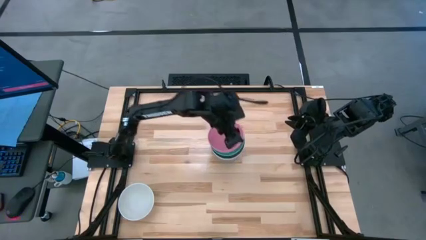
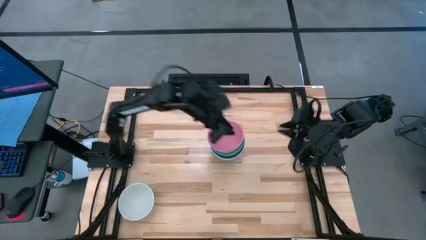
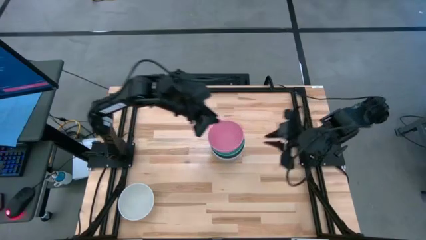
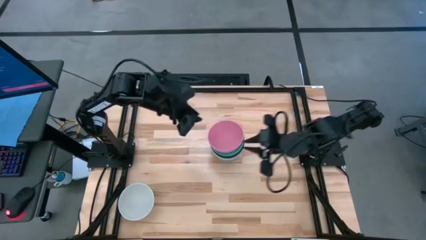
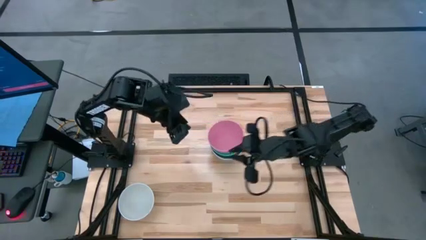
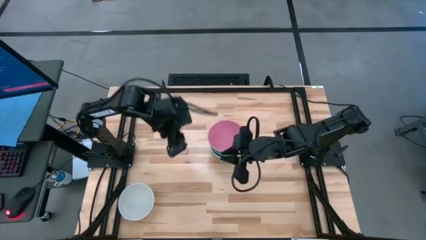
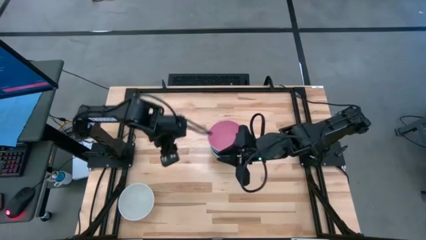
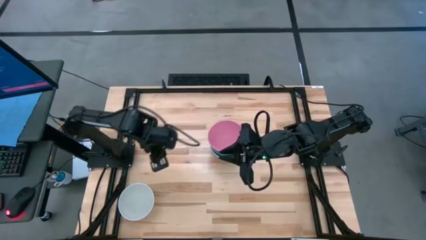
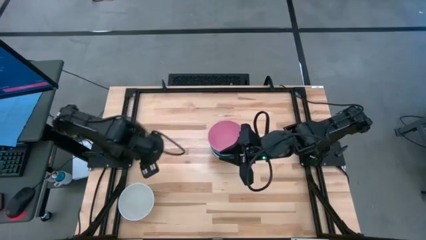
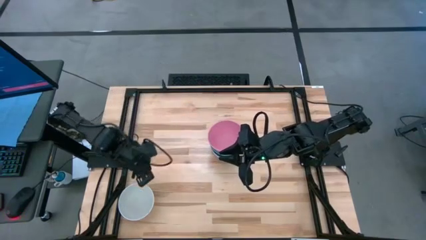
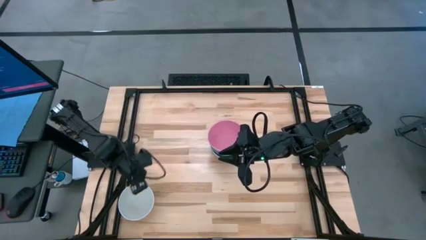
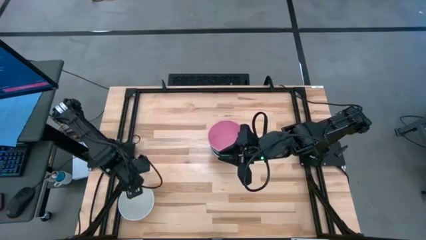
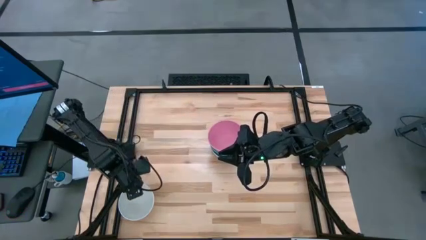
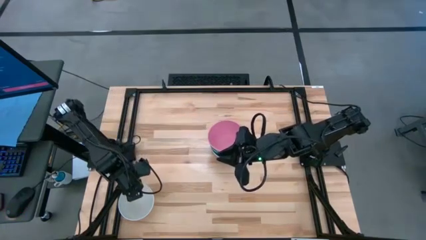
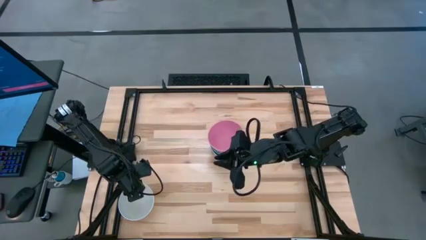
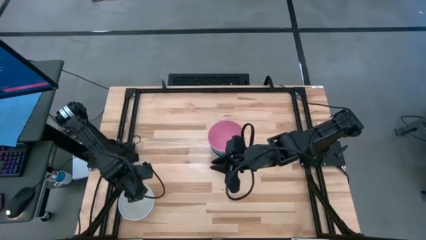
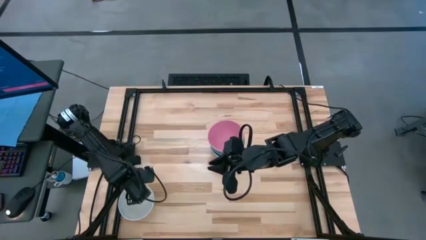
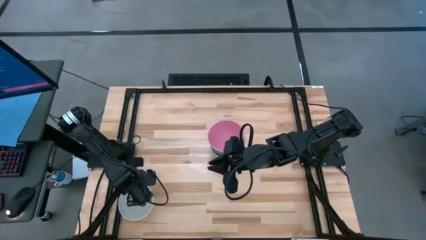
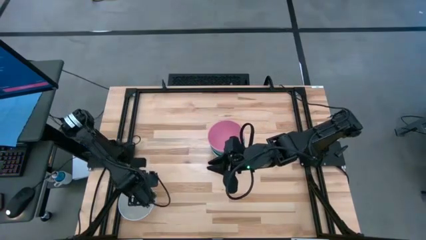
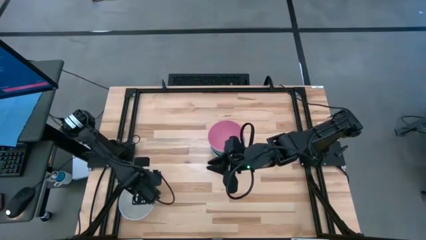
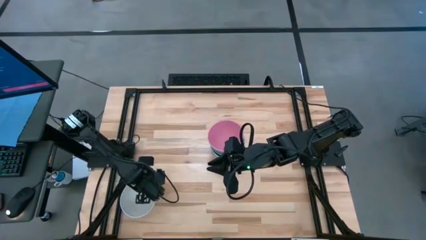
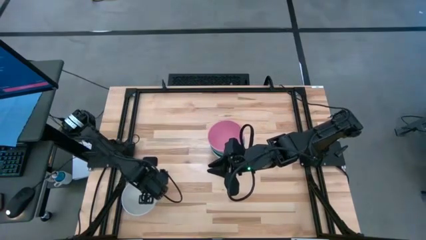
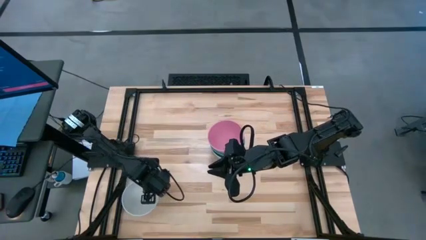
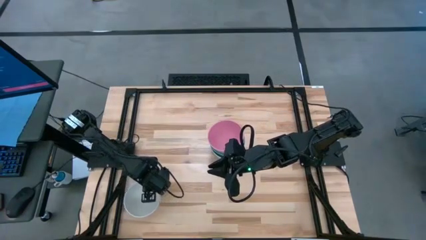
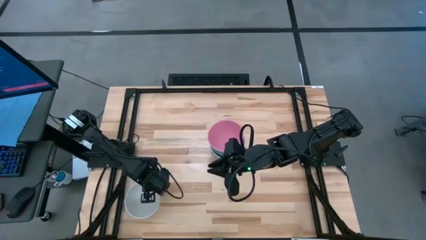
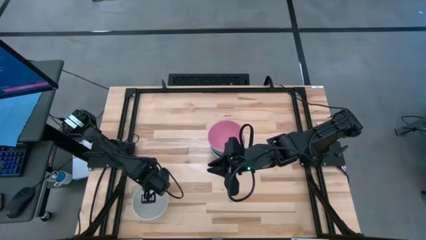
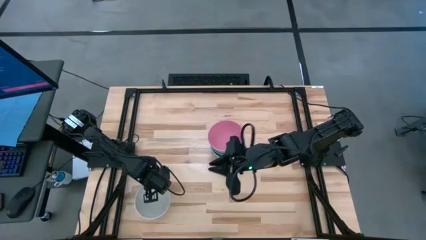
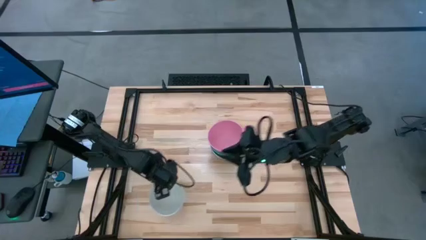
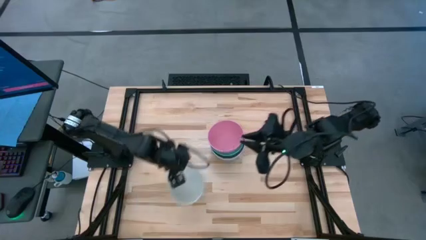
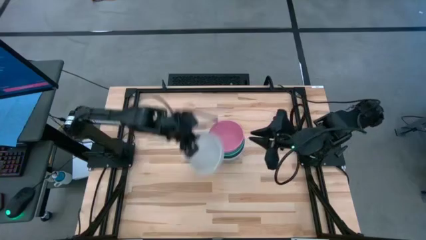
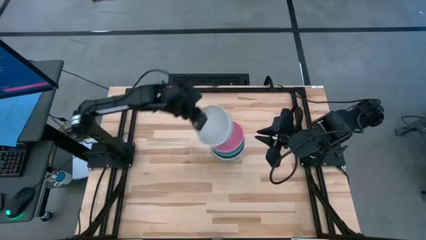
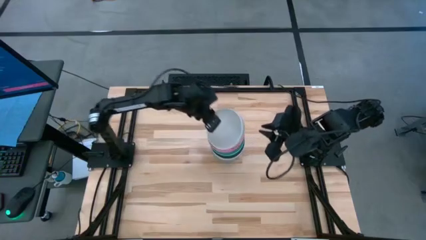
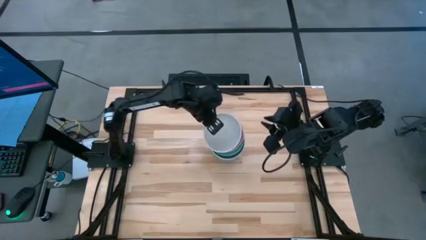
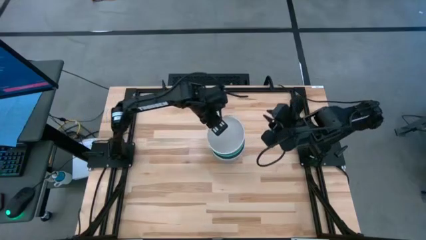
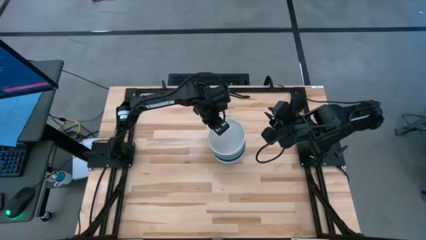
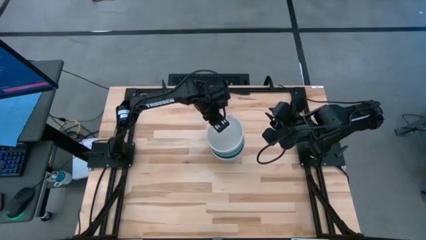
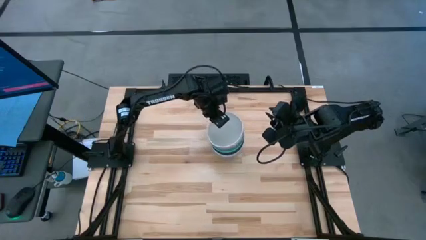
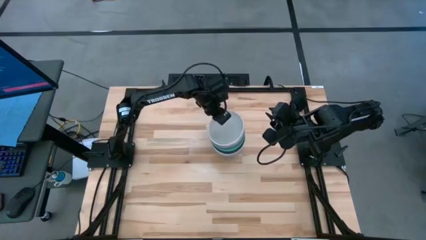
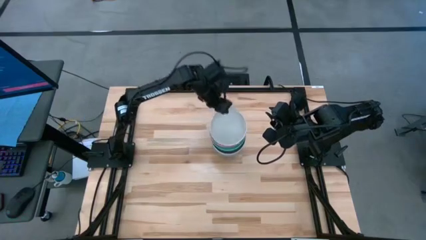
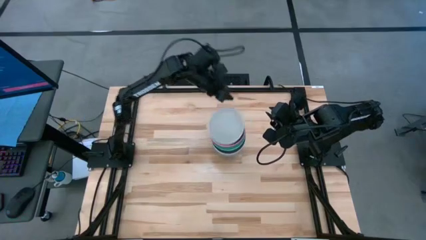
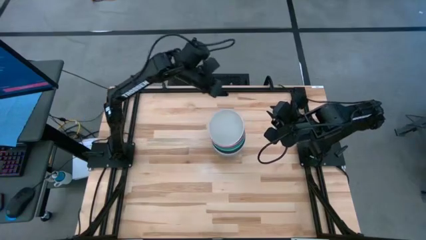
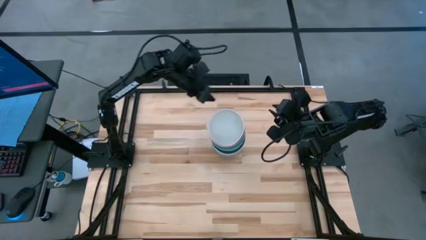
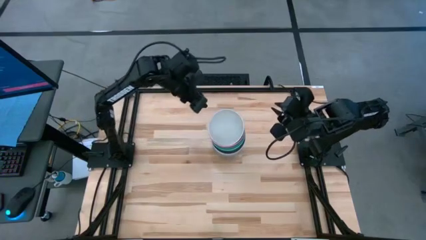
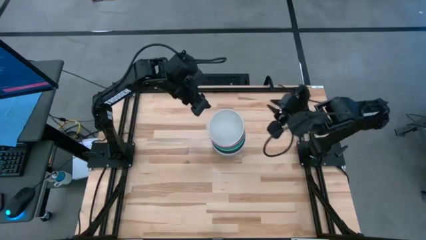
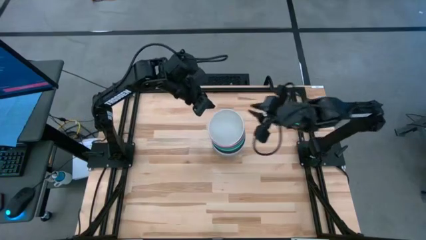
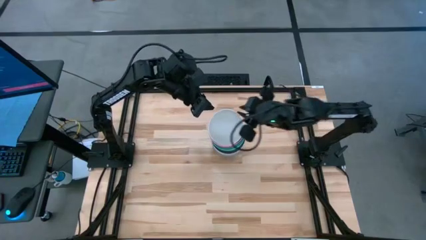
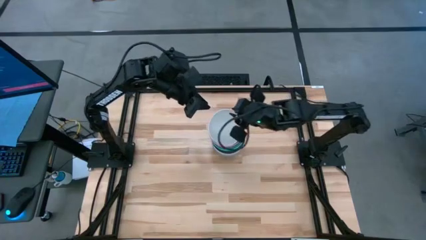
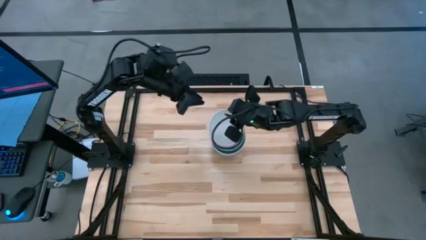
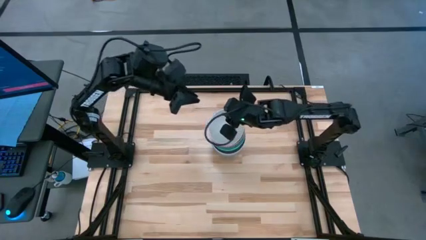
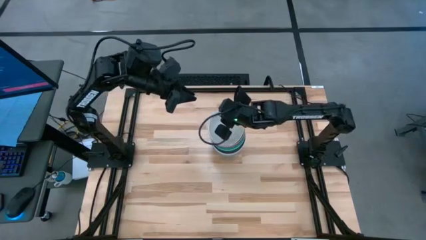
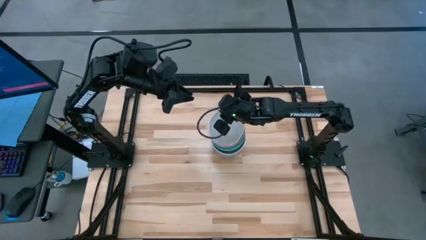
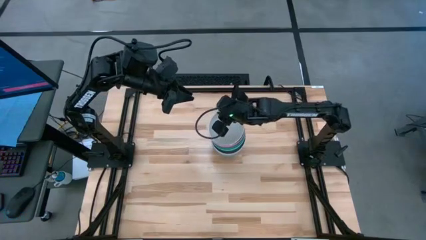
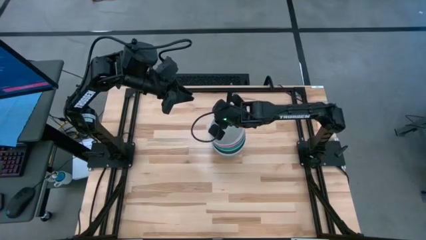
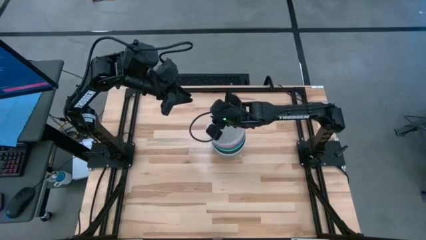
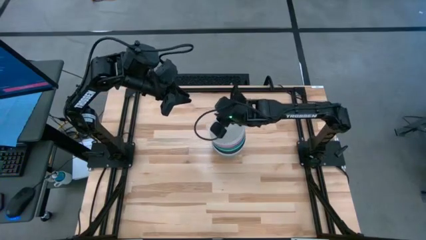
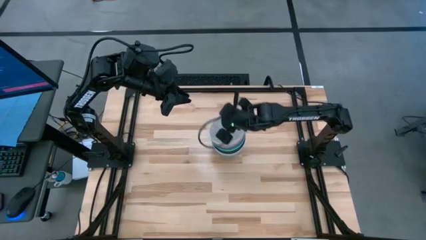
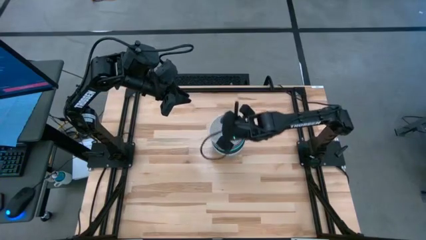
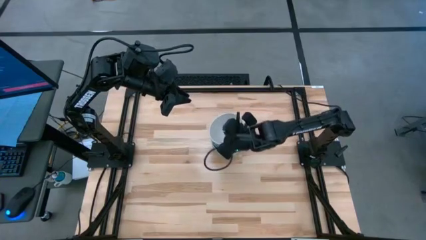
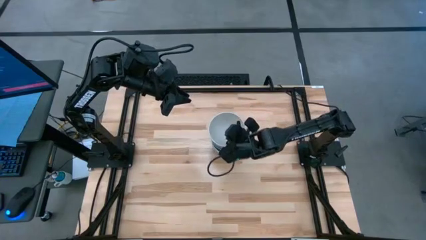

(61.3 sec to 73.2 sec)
Task: Nest bowls inside each other
Stack the white bowl on top of the pink bowl

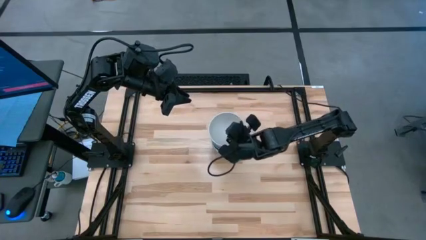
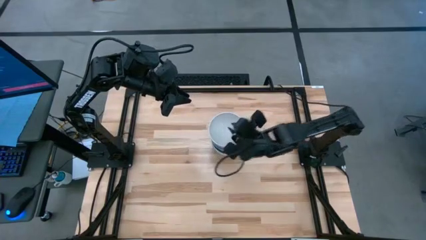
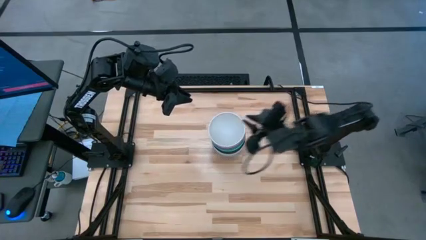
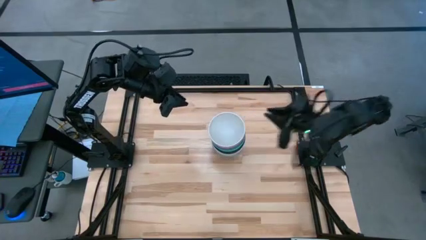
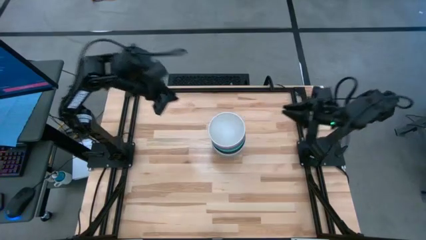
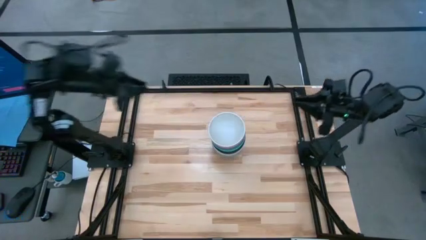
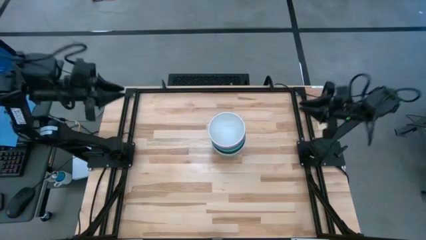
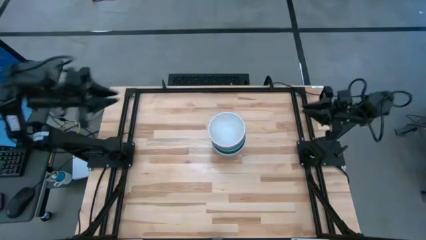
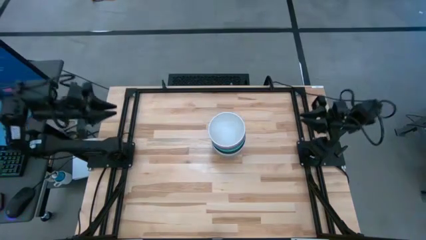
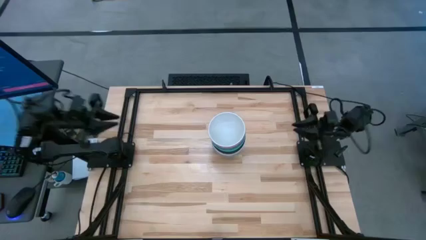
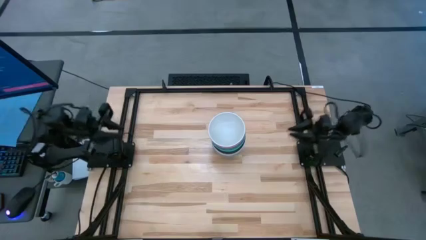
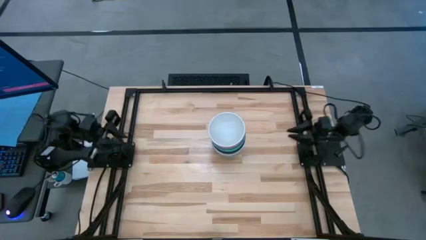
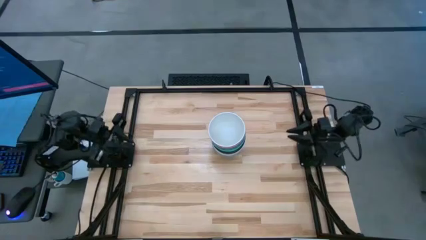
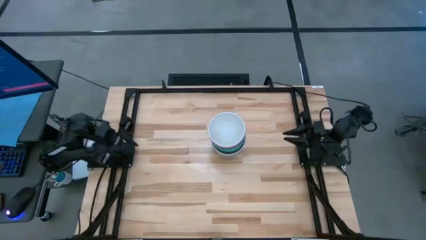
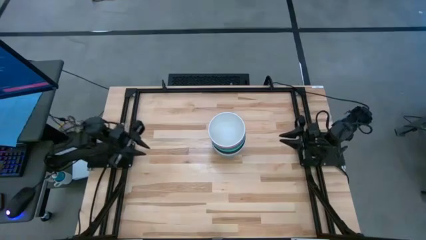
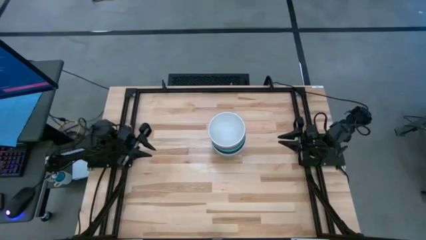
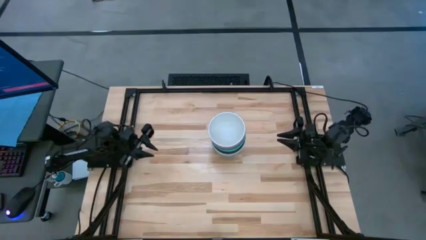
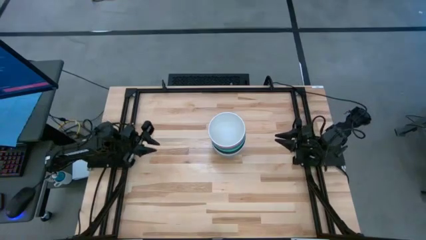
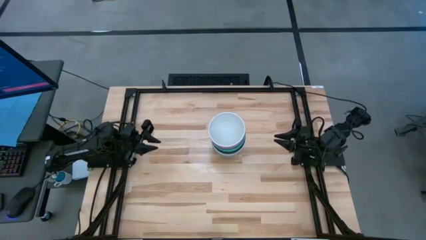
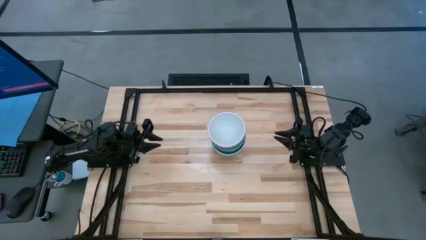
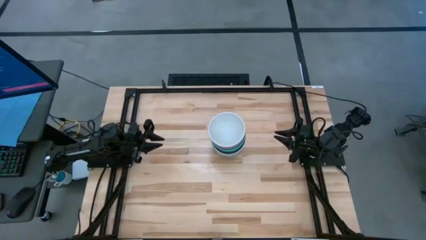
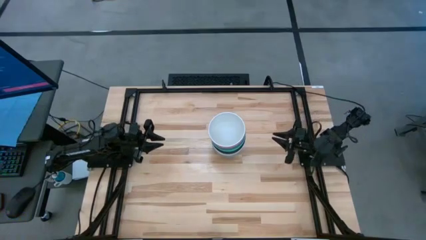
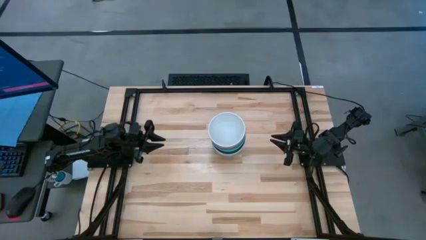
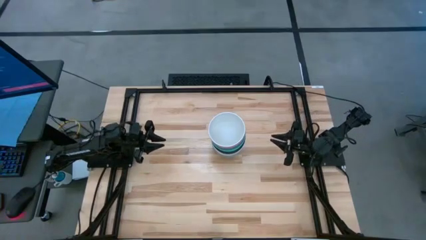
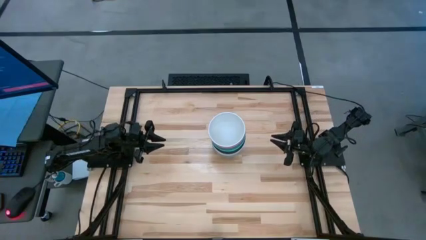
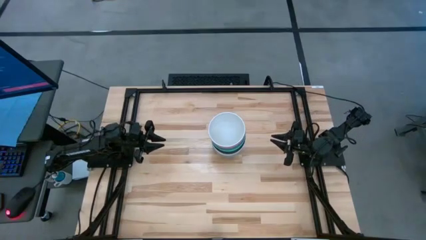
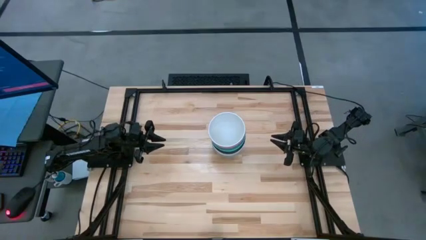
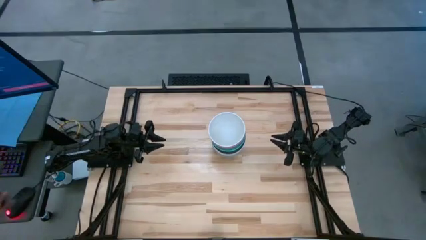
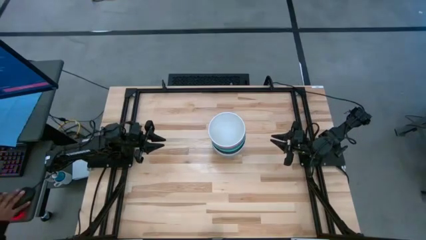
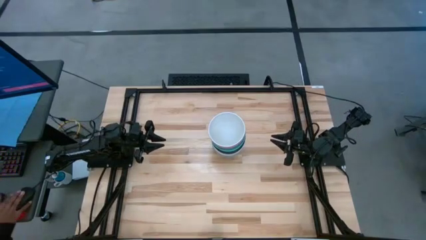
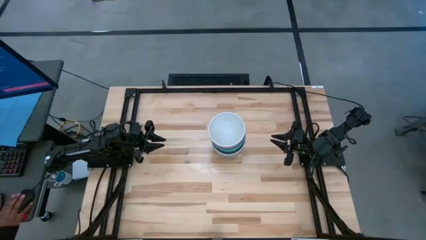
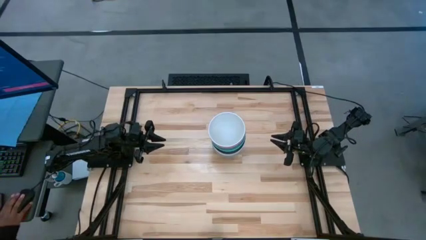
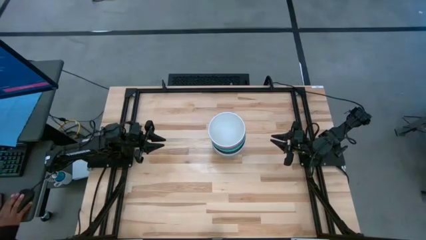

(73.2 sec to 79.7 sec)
Return to Home Position
